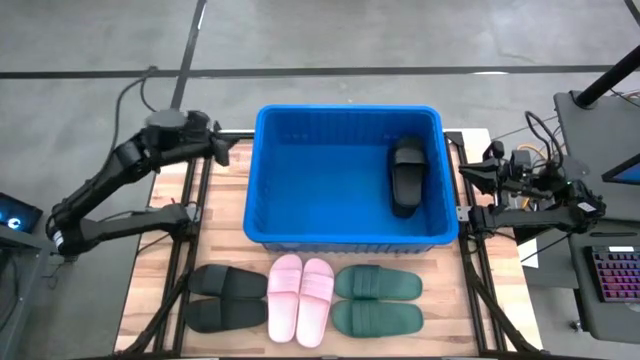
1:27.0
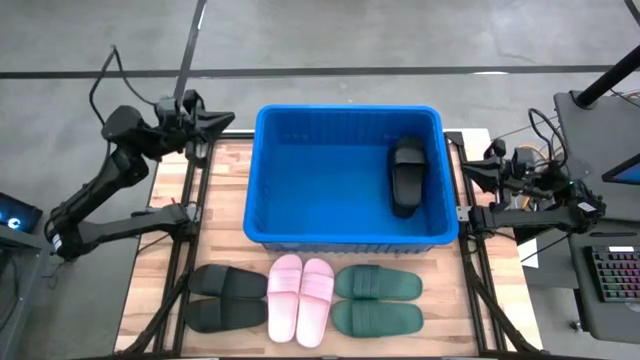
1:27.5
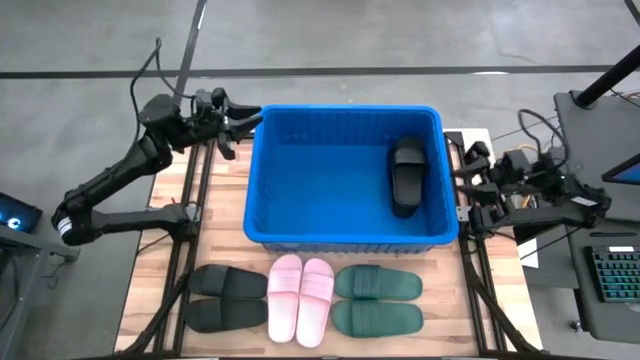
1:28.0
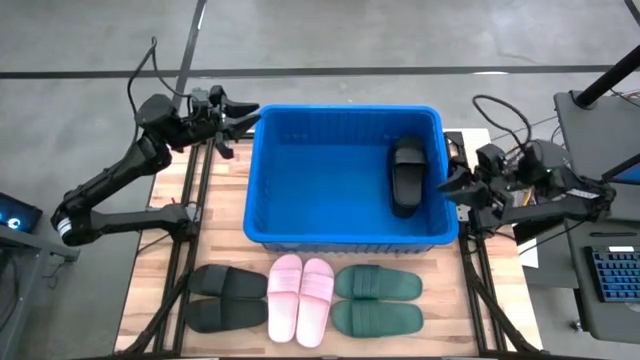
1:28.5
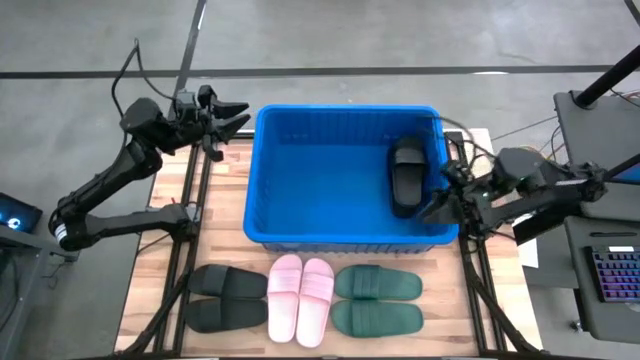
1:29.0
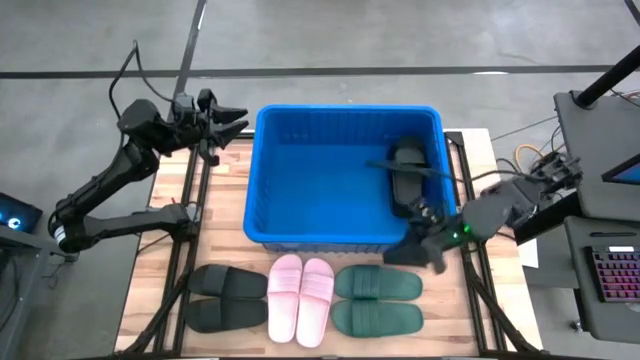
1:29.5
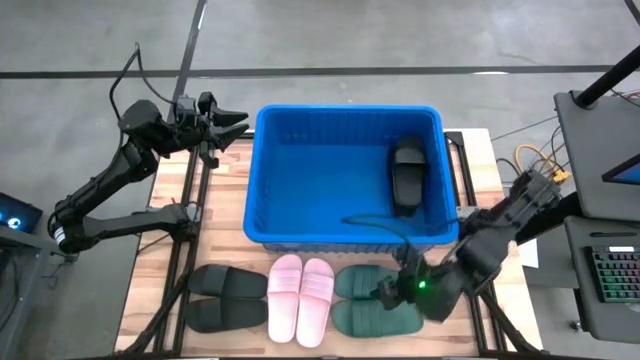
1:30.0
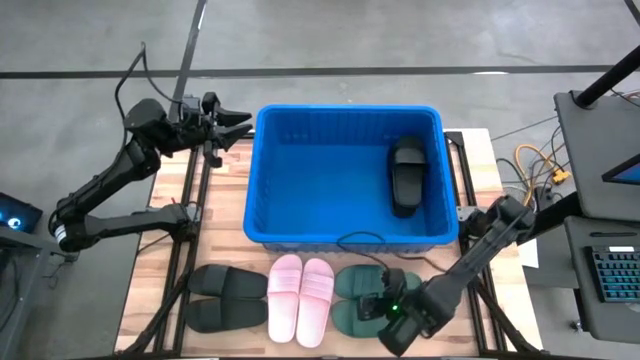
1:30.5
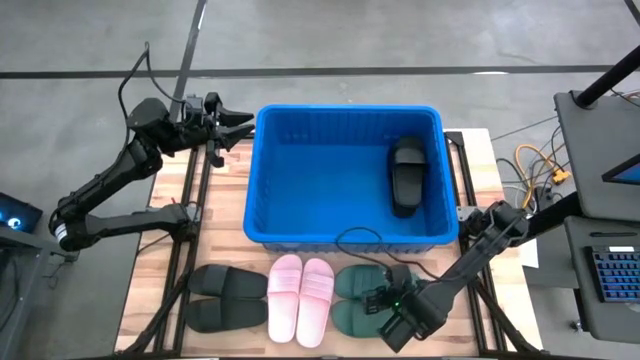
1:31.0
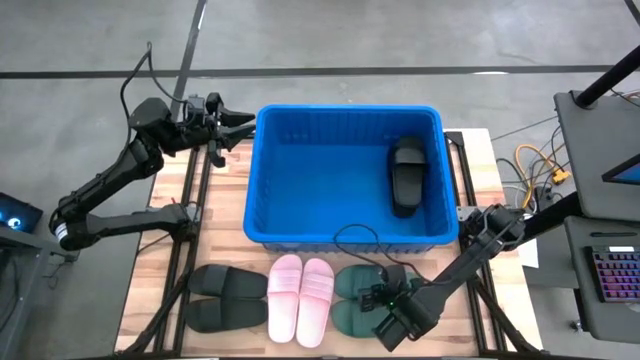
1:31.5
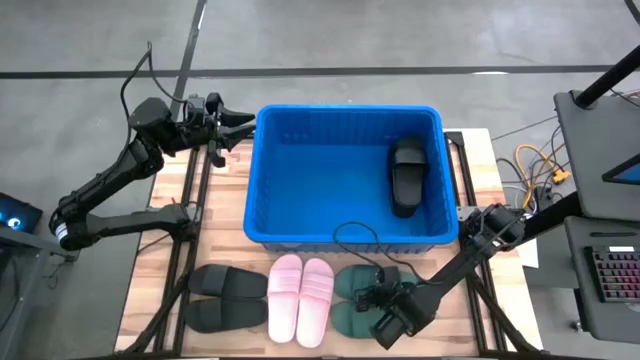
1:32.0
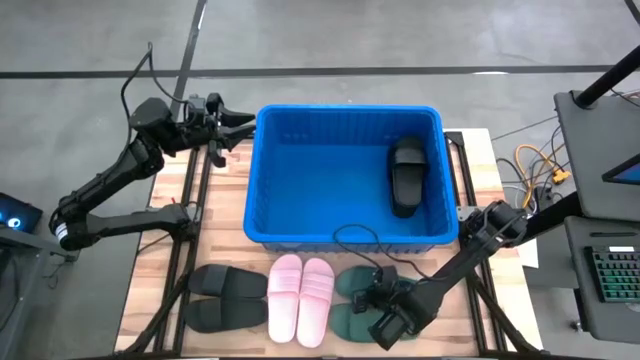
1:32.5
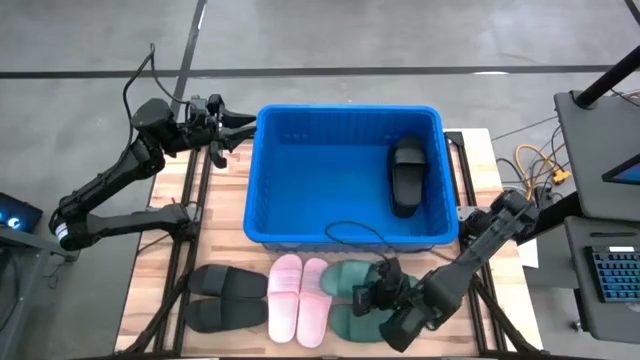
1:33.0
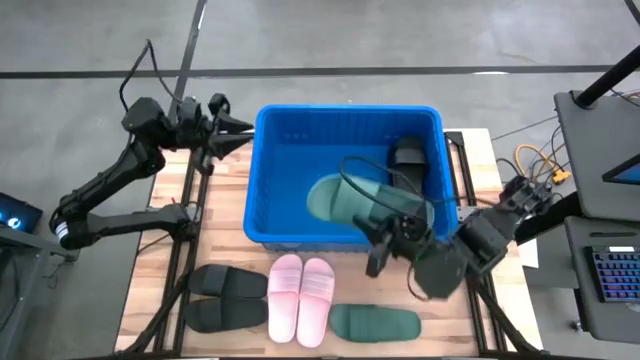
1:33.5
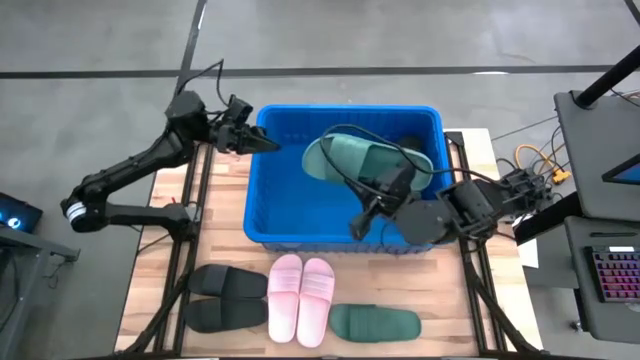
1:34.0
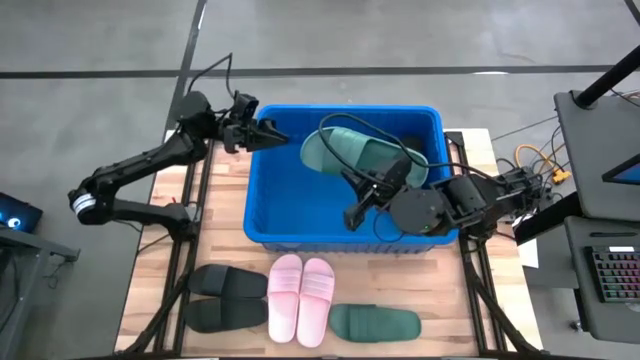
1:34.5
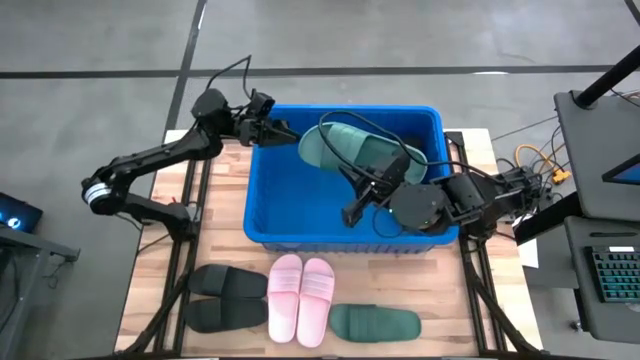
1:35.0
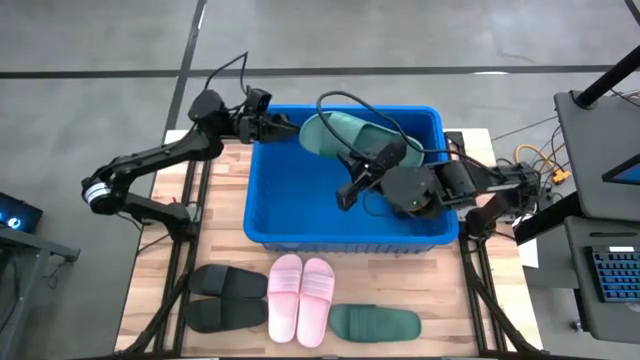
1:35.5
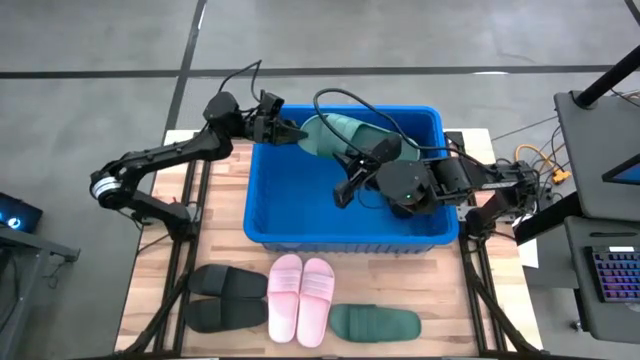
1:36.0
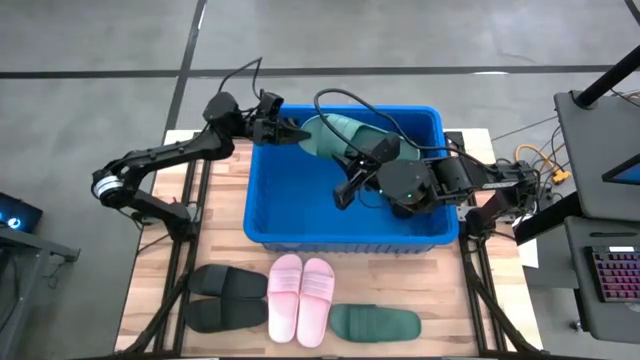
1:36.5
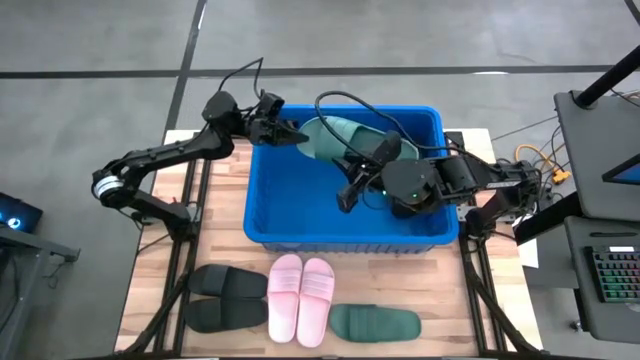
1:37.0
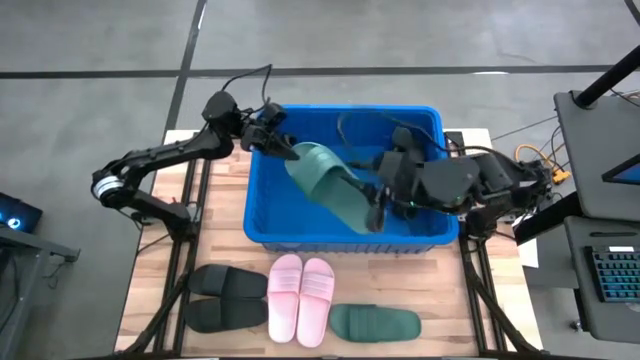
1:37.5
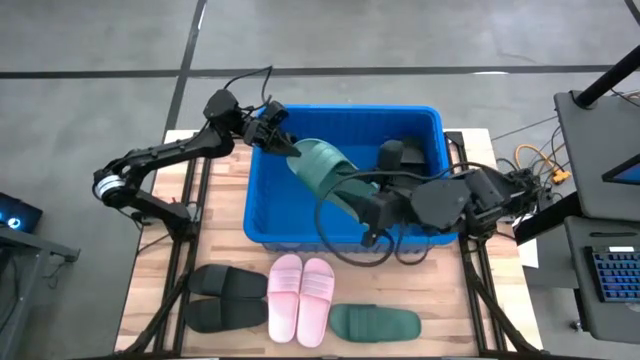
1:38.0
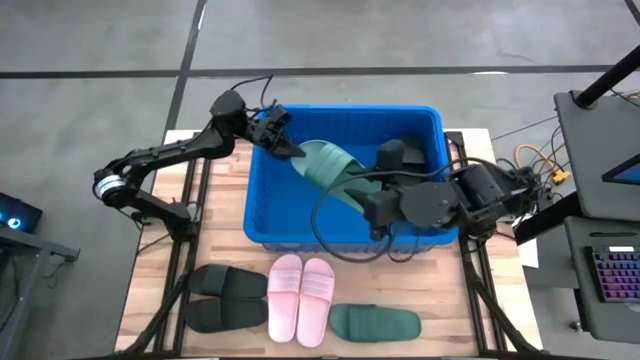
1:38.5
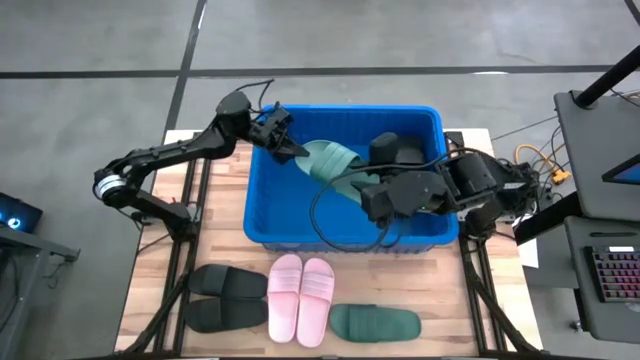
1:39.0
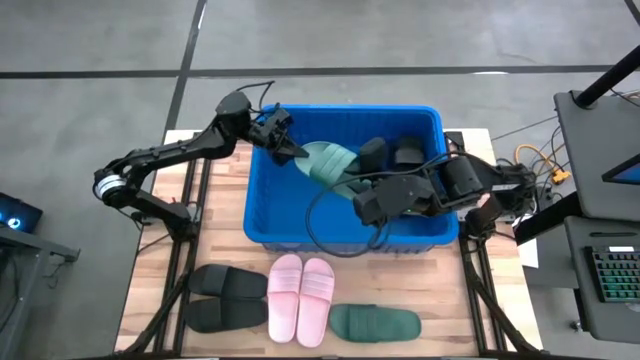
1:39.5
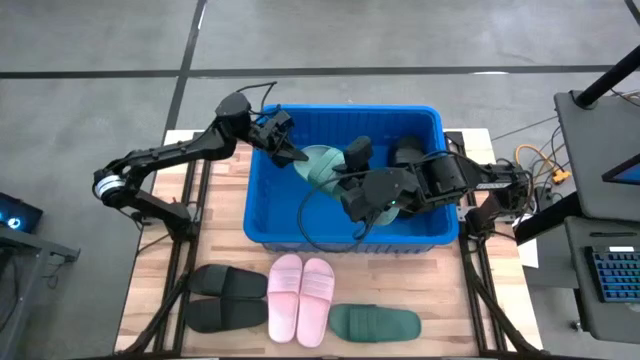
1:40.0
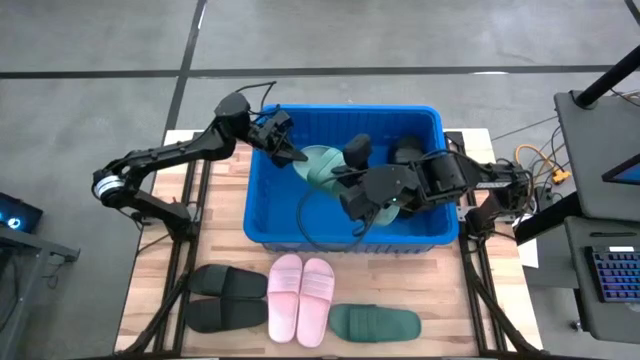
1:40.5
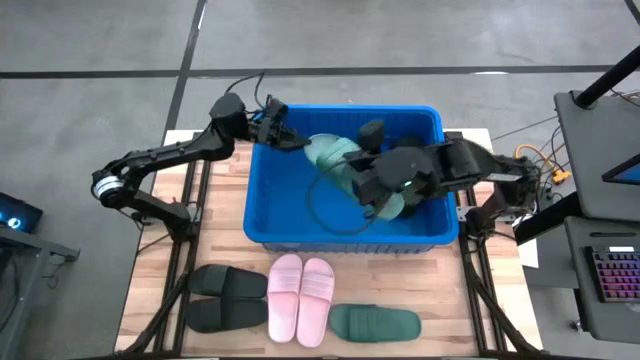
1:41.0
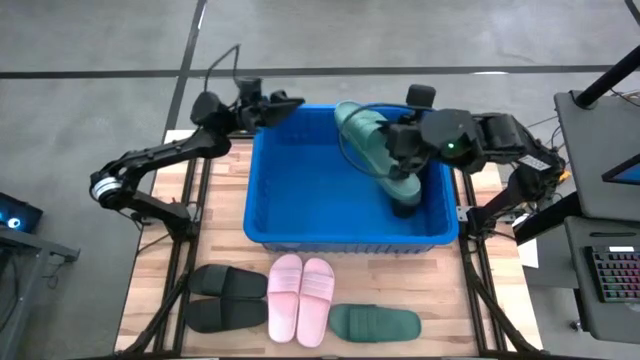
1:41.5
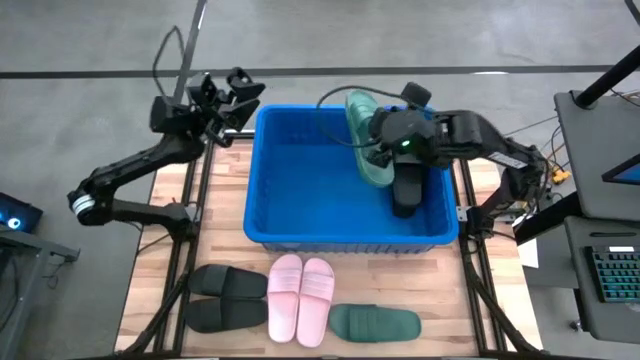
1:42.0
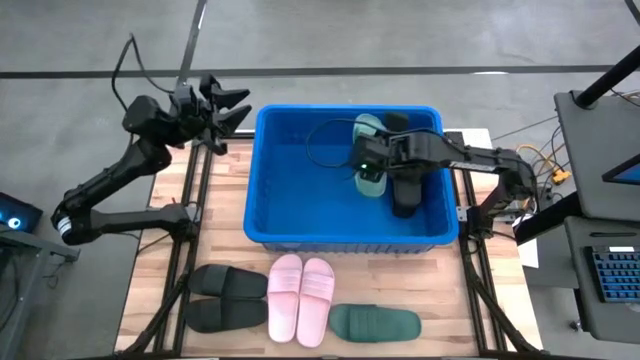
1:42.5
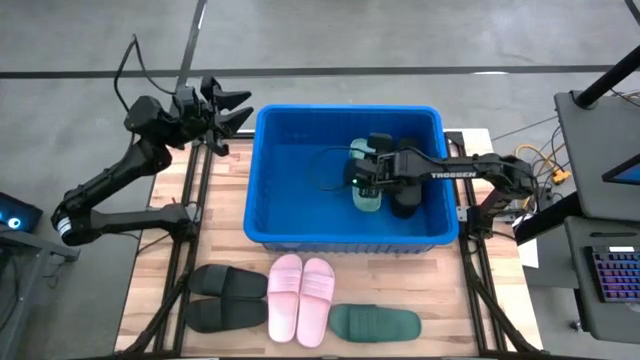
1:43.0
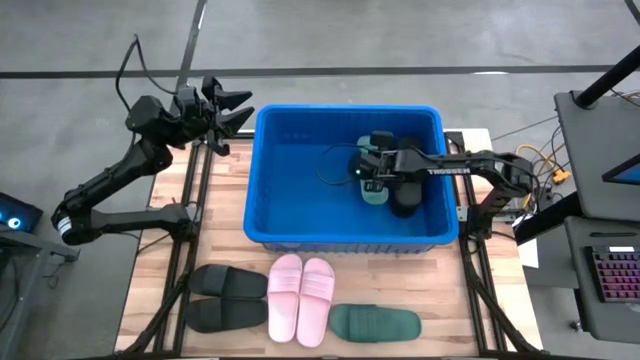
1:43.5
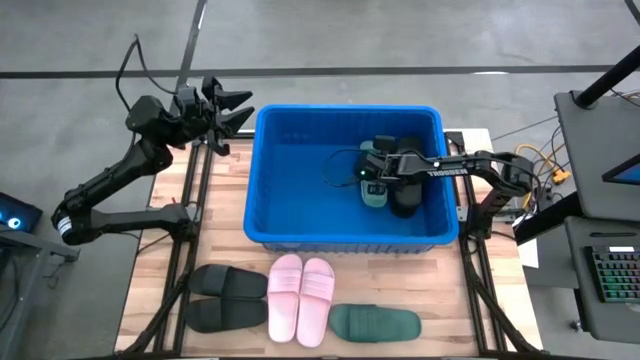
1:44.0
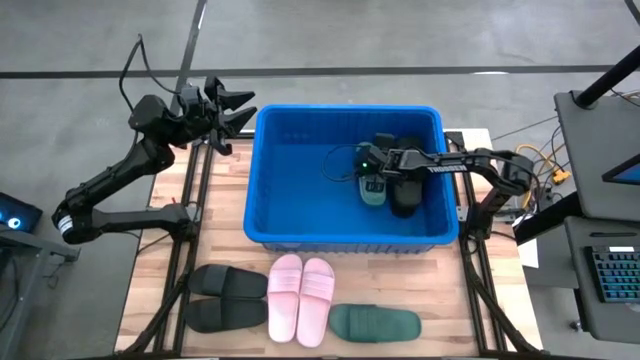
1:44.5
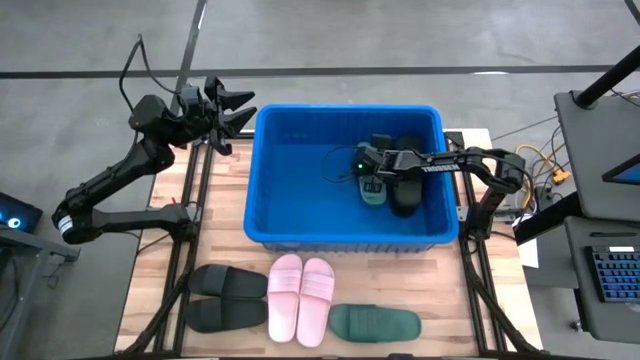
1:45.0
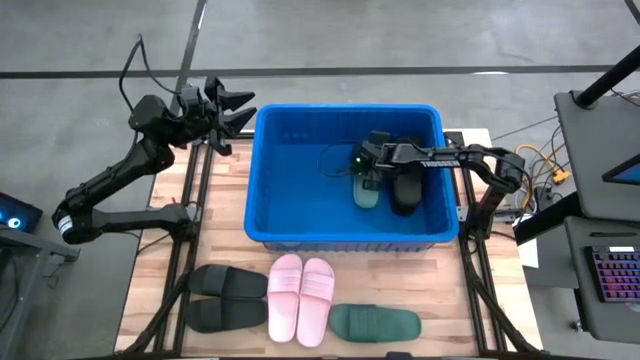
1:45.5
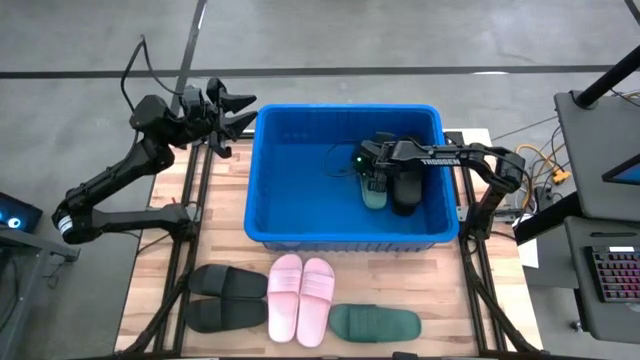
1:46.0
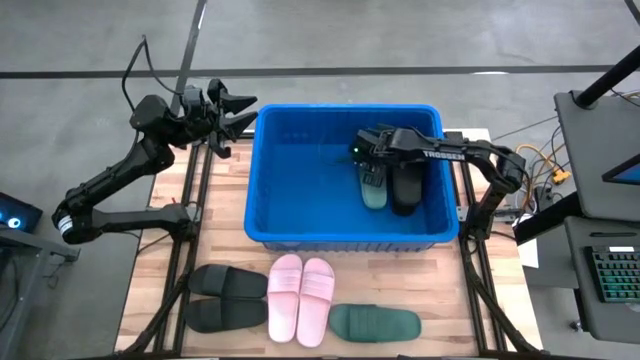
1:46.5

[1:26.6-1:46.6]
Task: Pick and place slides into bin
Put the green slide into the blue bin

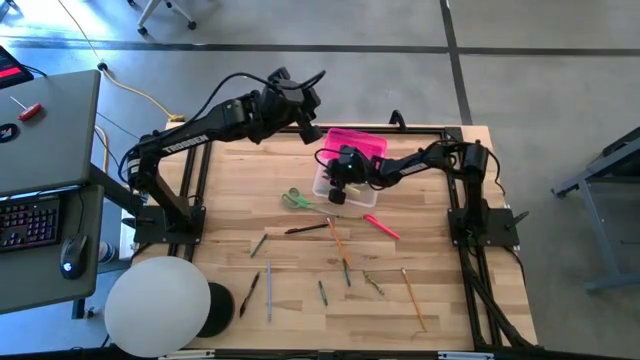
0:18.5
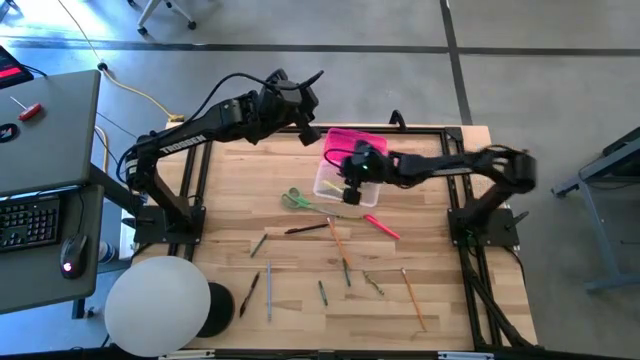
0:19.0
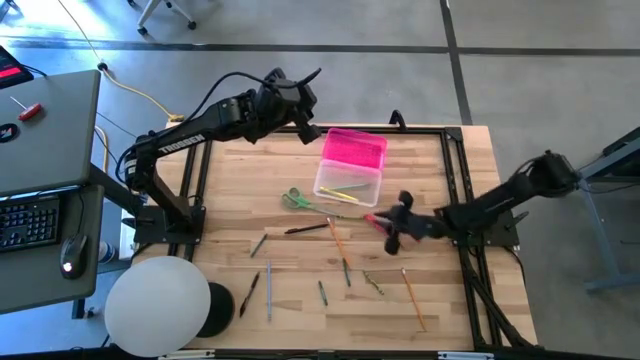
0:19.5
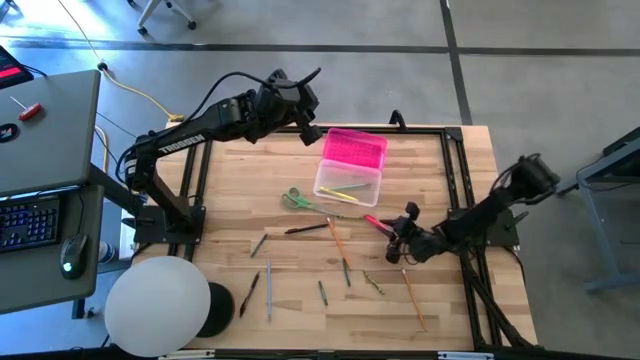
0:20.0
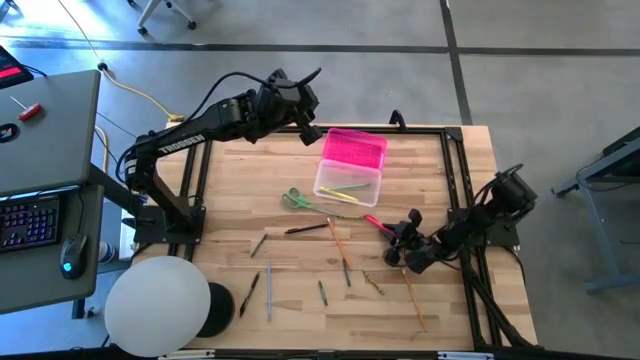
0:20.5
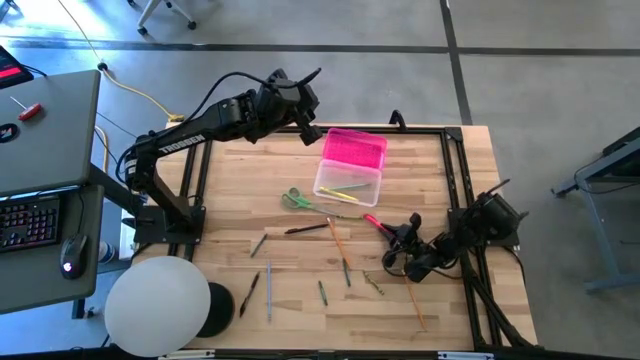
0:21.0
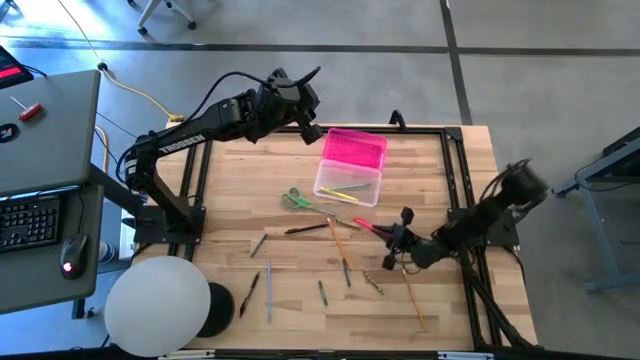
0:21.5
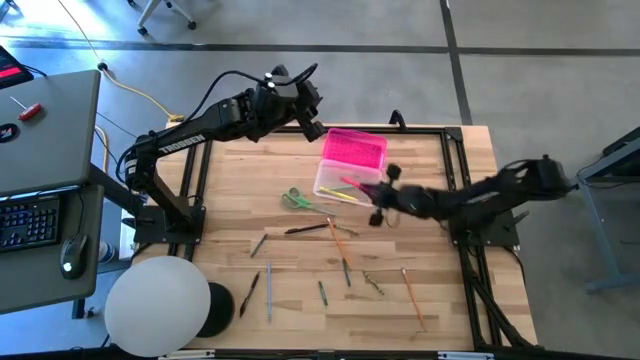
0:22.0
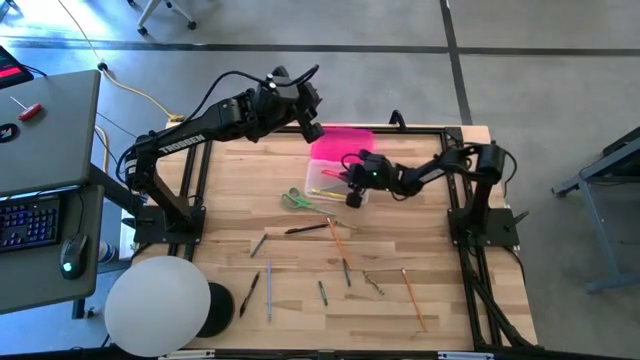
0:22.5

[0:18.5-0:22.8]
Task: Pick & place school supplies into a supply box
Put the pink pen into the supply box
